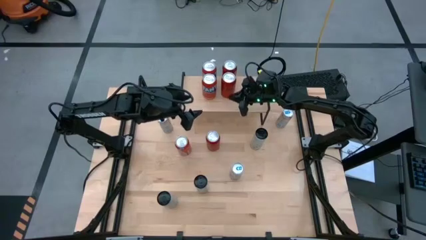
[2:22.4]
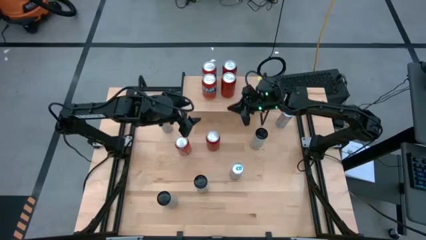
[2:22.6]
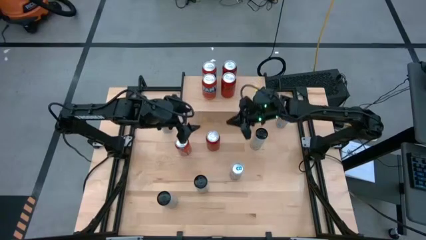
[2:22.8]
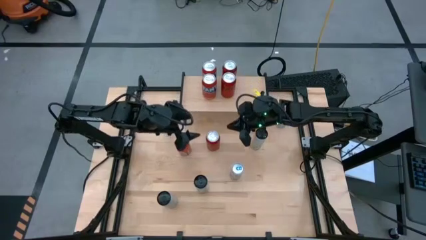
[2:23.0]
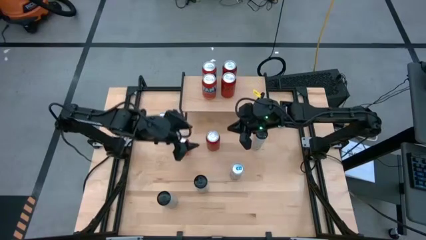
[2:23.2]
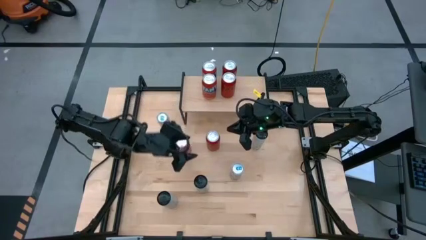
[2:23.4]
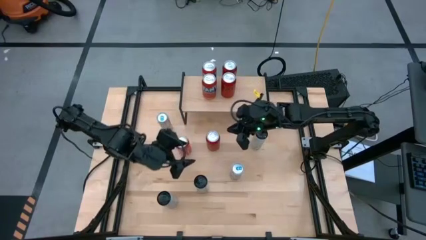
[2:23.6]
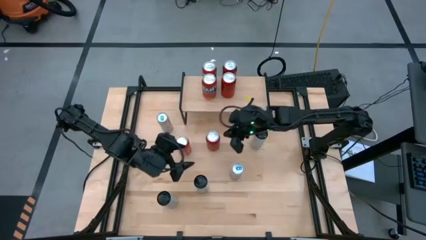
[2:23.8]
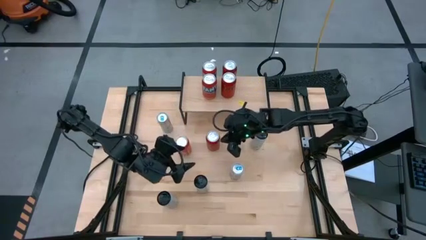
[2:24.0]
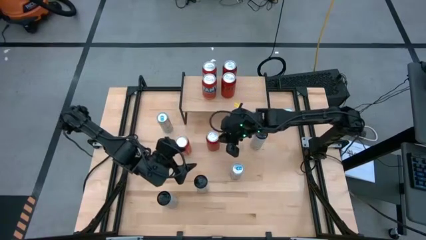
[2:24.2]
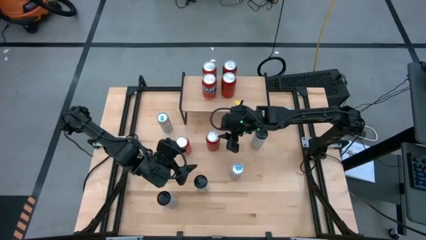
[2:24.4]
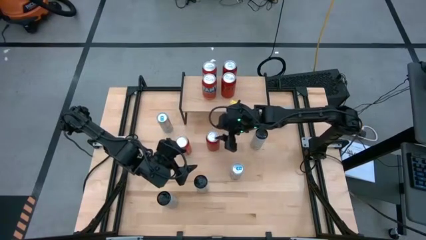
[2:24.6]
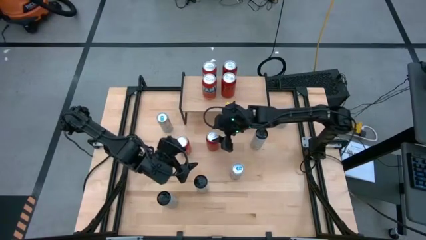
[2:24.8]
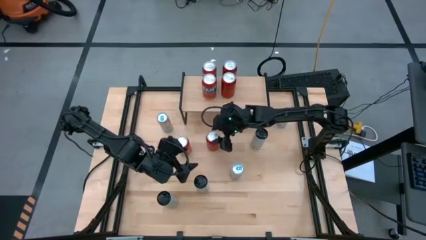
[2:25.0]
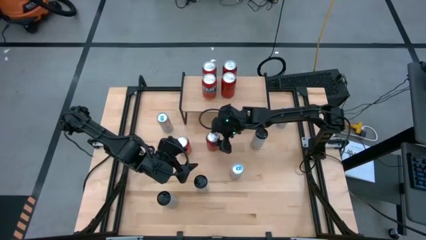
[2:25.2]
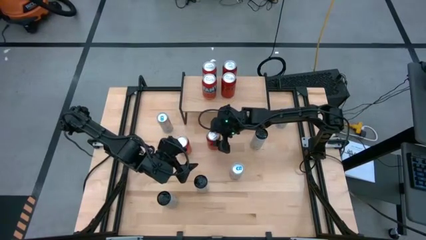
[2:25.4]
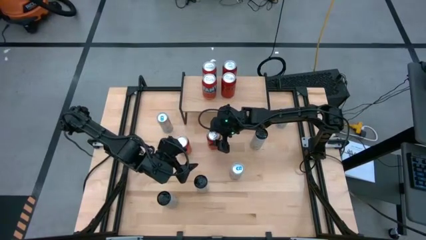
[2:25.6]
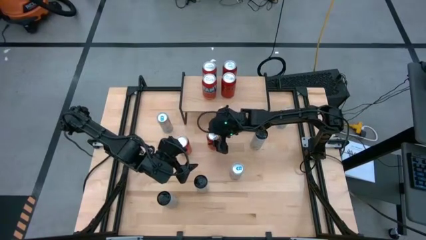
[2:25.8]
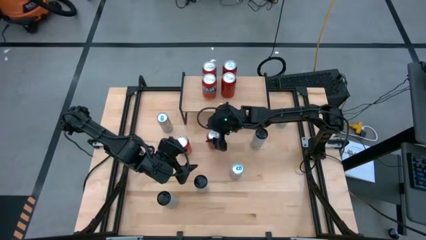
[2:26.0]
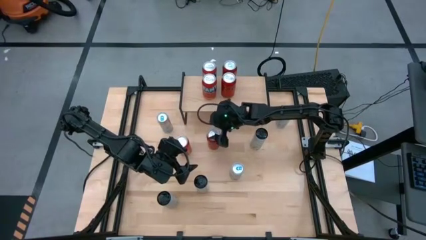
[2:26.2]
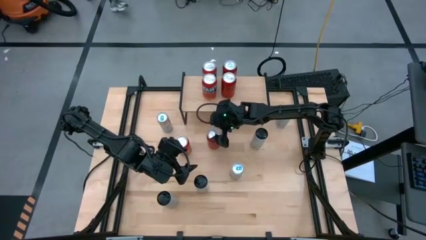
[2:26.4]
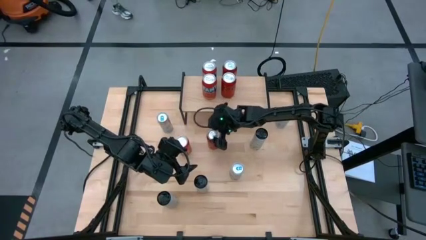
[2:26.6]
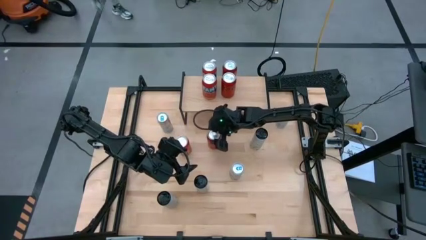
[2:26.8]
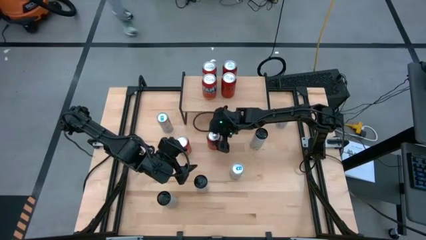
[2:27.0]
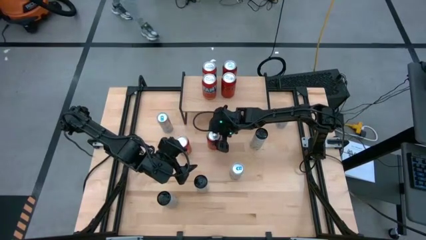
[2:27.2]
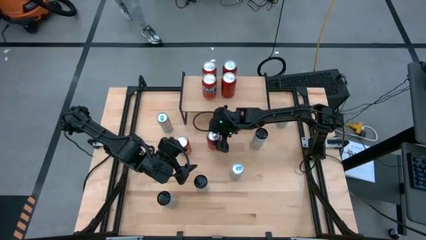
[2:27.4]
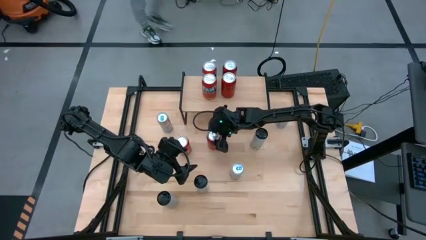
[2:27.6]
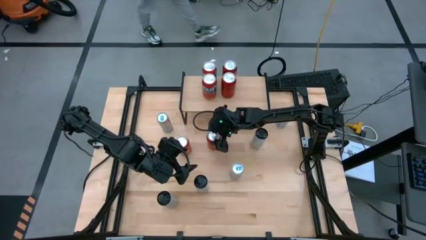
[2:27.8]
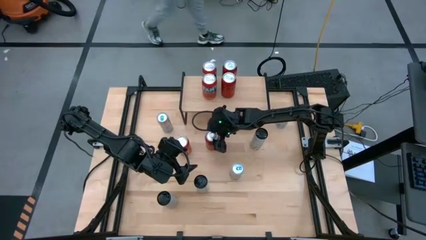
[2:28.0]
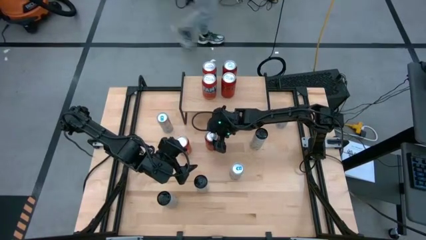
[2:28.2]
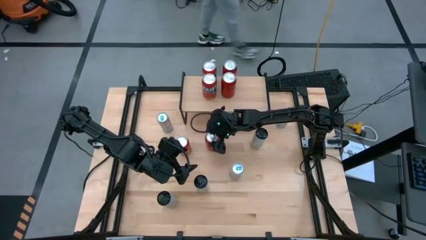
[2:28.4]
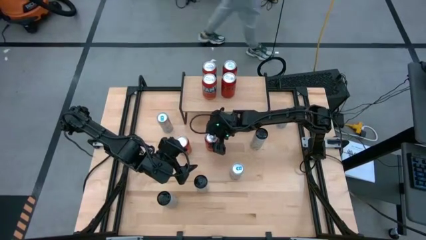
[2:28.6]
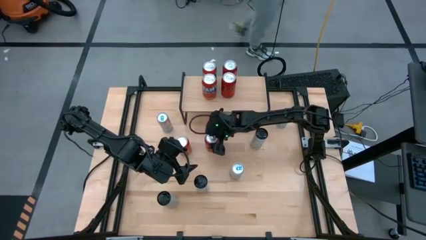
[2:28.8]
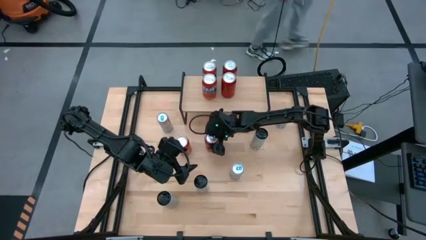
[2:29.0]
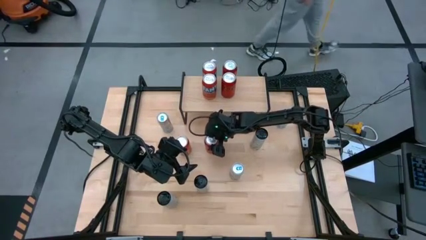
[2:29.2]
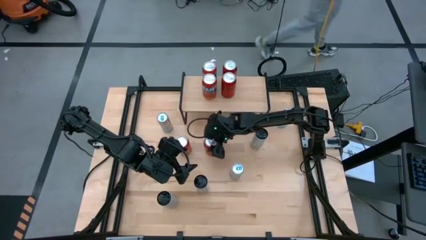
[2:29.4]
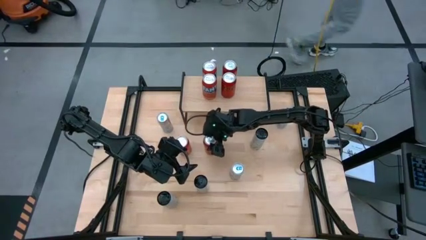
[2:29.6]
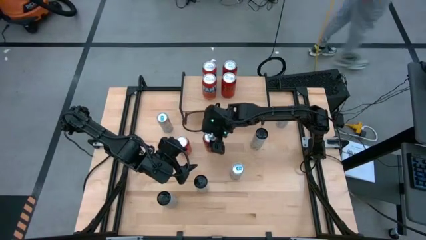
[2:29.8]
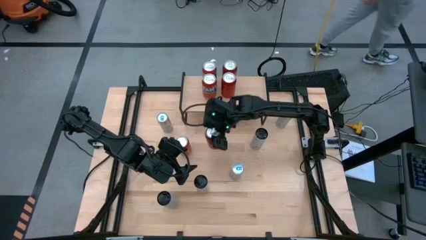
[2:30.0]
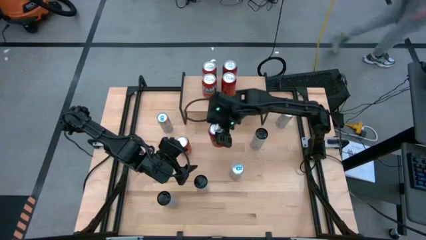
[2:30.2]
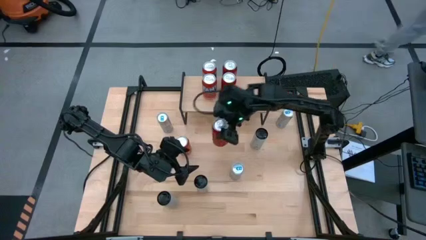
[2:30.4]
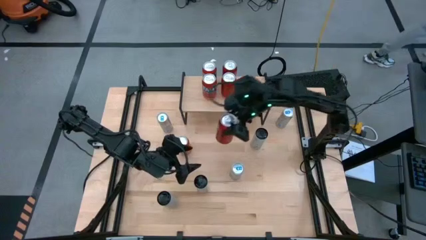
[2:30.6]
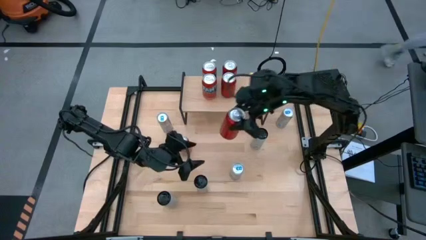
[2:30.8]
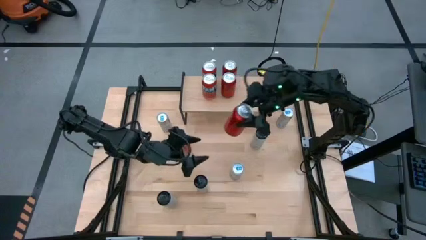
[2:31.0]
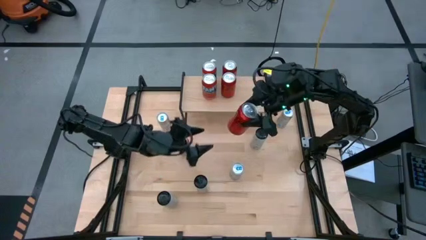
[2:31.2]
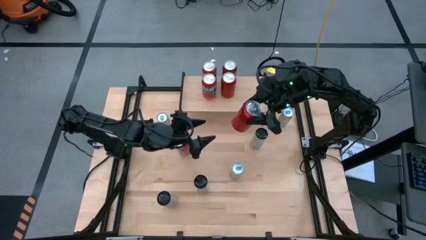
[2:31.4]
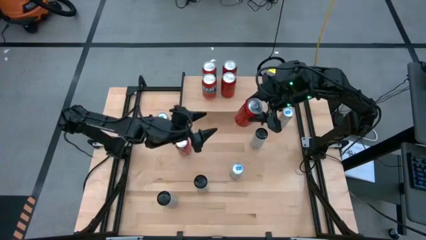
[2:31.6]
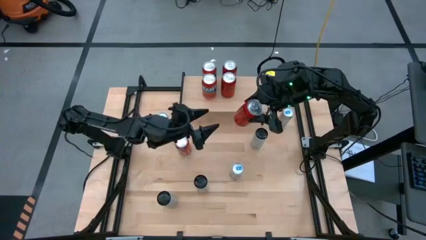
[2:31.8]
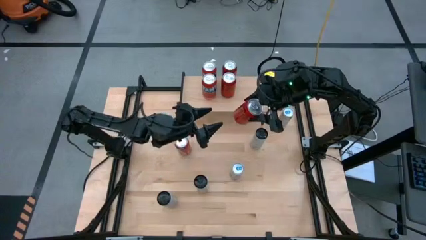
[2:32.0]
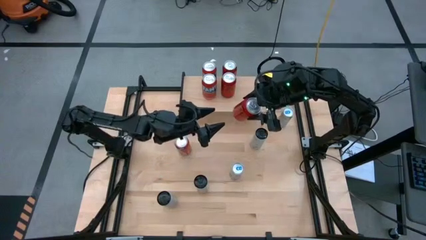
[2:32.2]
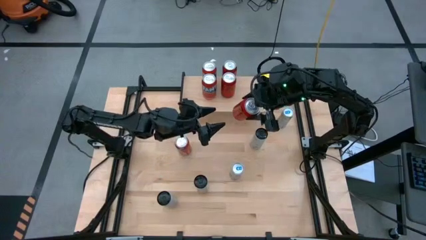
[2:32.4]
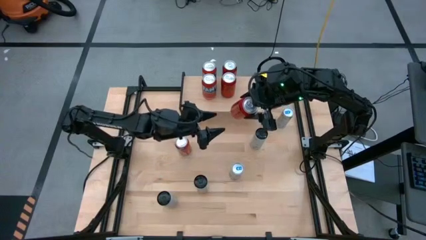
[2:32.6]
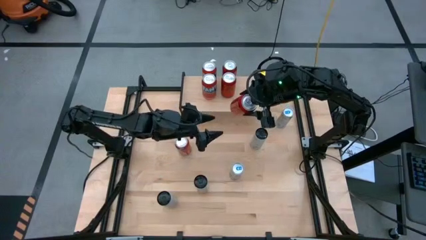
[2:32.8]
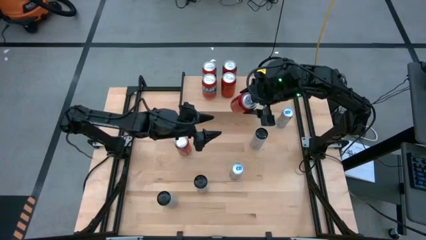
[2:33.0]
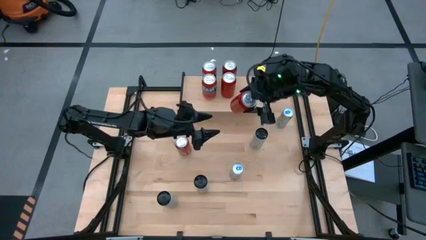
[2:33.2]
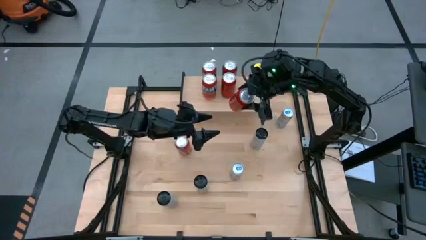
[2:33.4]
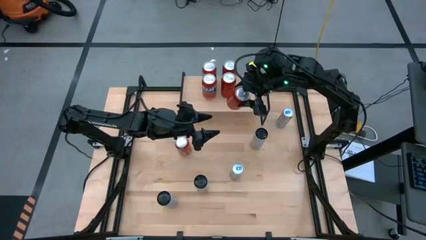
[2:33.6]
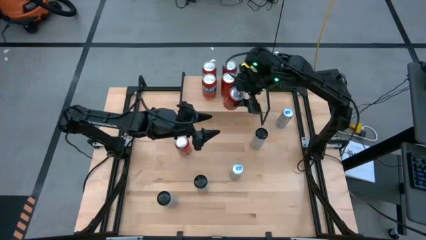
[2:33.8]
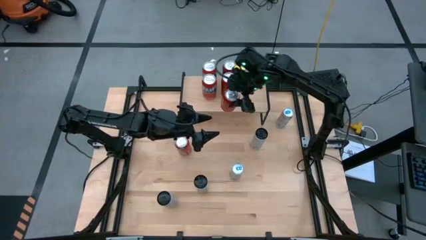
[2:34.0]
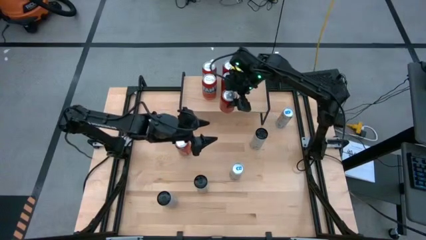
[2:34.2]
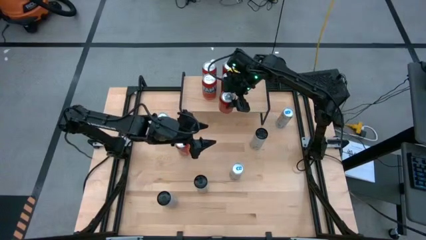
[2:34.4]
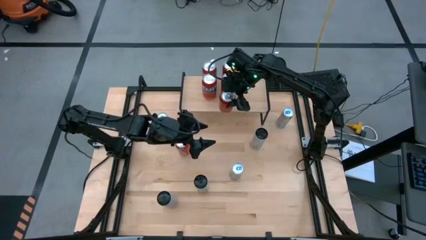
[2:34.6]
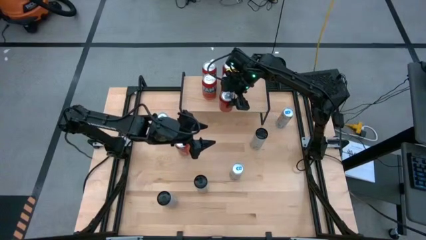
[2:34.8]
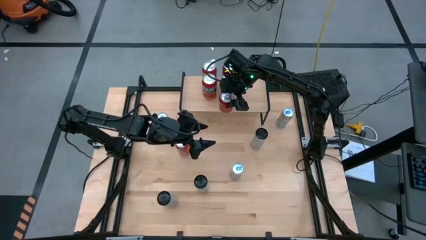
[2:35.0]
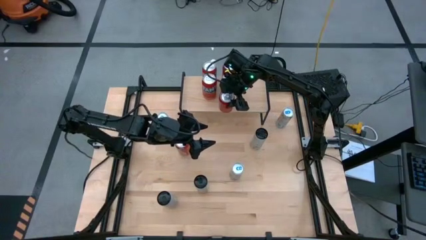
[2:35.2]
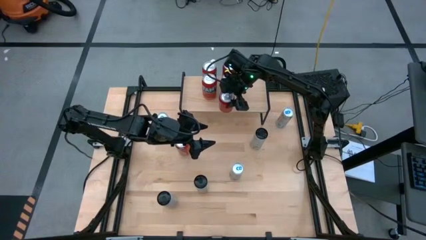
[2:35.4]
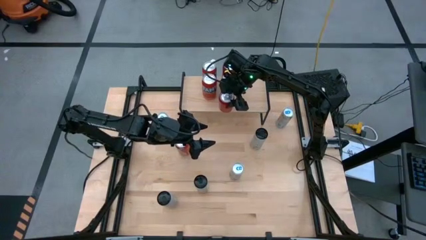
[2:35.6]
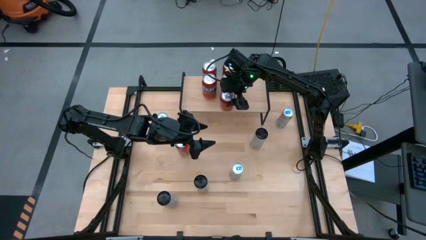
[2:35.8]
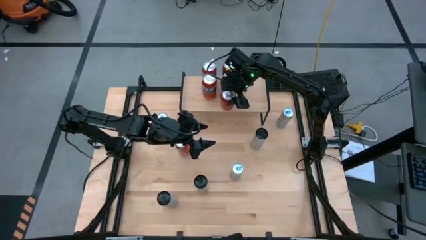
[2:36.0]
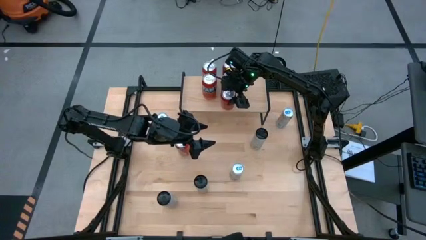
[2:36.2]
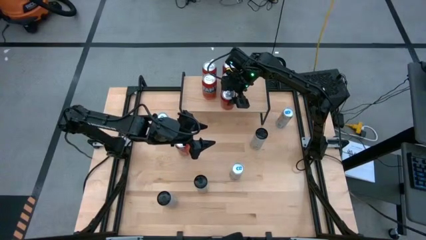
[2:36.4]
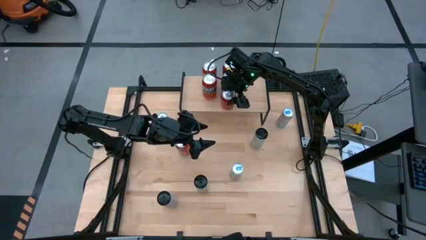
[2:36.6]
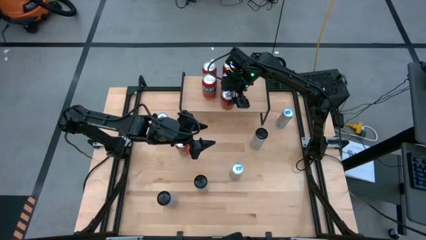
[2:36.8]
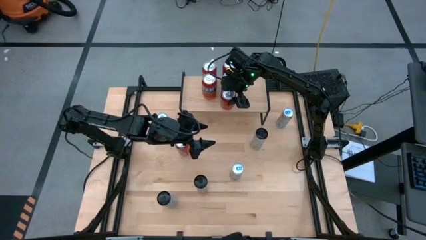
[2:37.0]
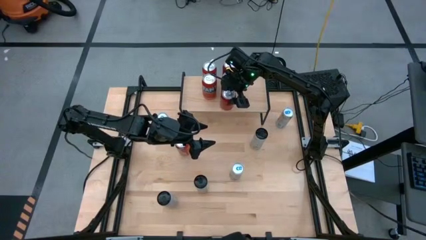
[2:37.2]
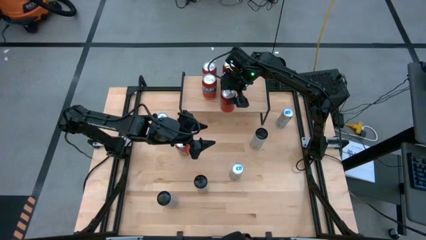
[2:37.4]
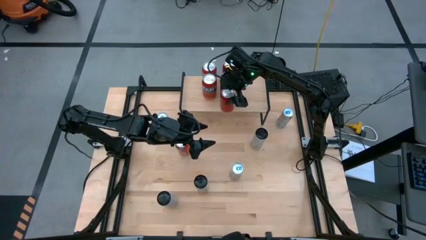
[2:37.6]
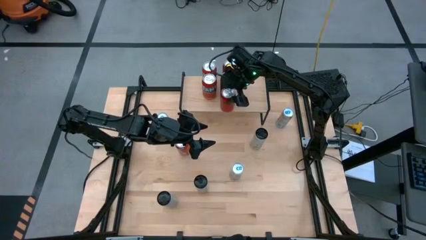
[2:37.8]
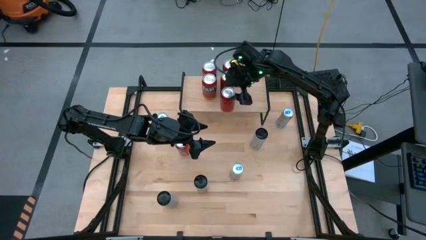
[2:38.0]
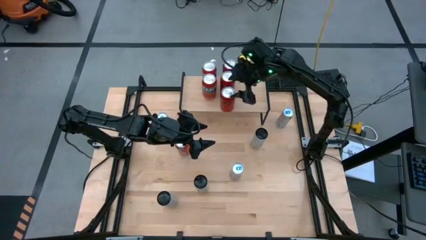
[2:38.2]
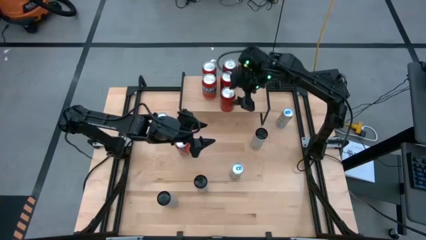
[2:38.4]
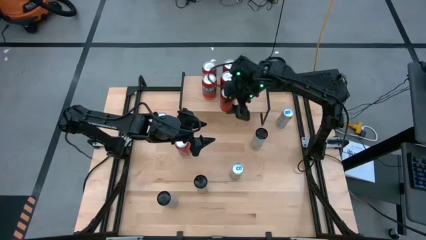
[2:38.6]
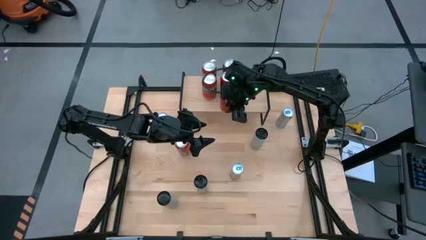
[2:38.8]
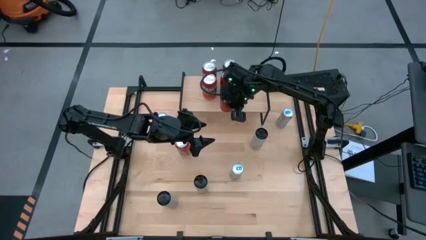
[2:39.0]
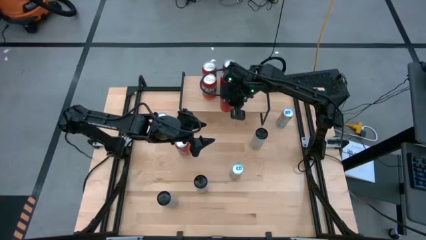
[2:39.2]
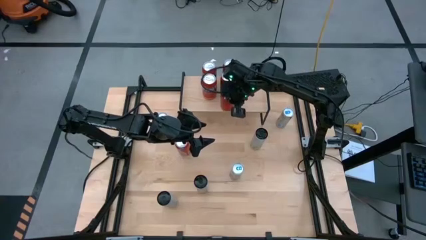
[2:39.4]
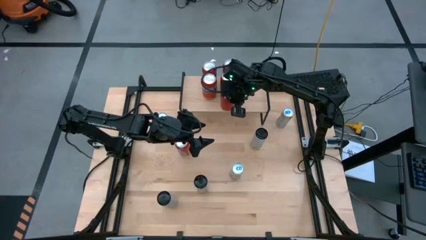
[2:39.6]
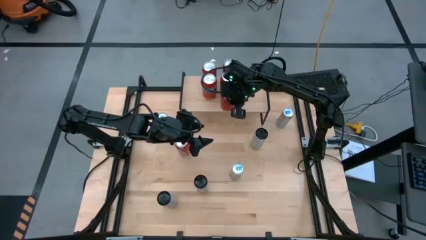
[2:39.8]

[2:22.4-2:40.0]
Task: Place canned beverage on shelf
Put the red-black soda can on the shelf aligned with the other red-black soda can

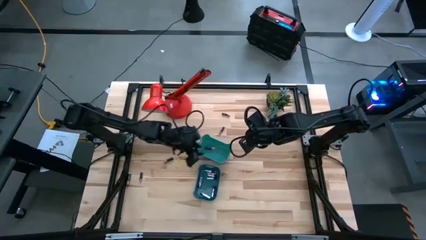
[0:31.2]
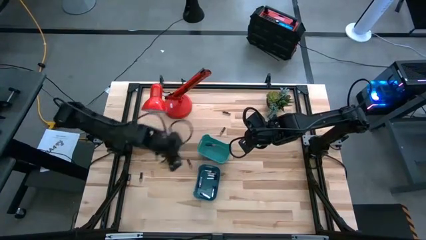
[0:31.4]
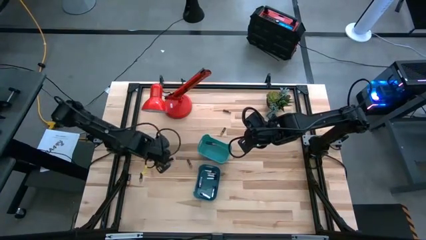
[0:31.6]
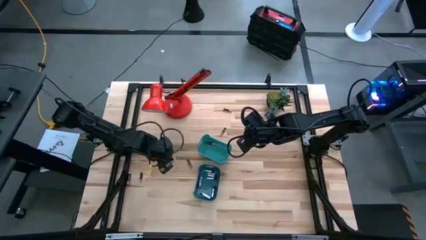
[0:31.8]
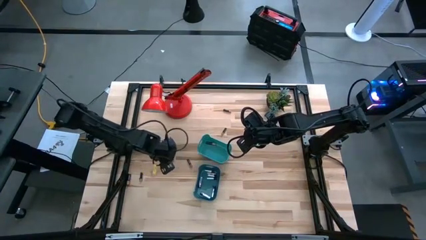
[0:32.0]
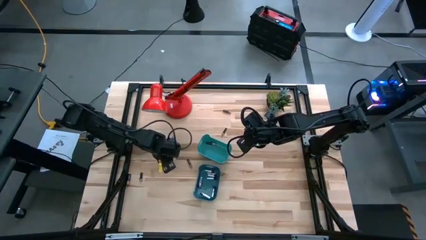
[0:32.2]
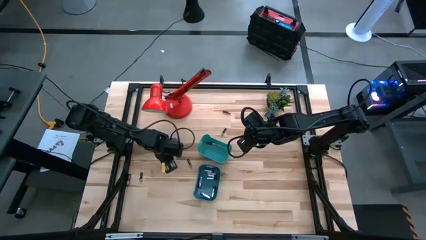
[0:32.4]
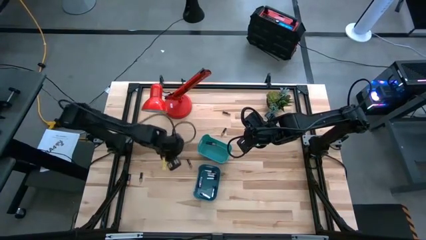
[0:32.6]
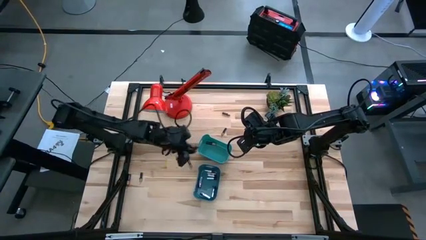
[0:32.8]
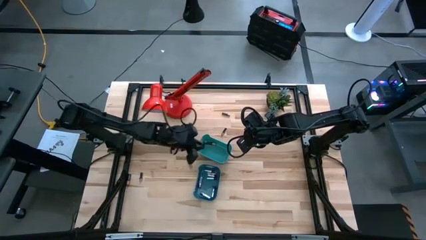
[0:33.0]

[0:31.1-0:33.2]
Task: Sort batteries
Put the black battery into the light blue bin
